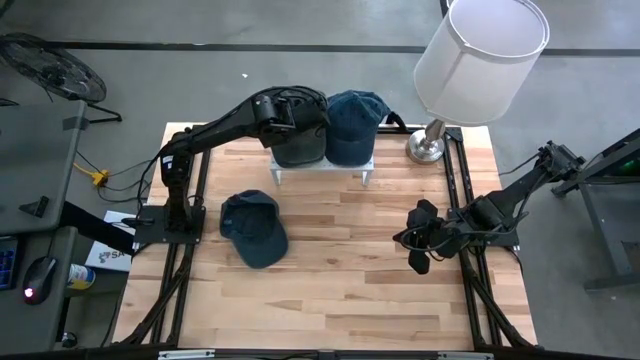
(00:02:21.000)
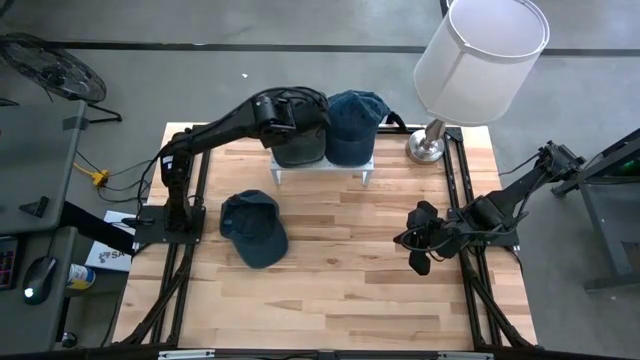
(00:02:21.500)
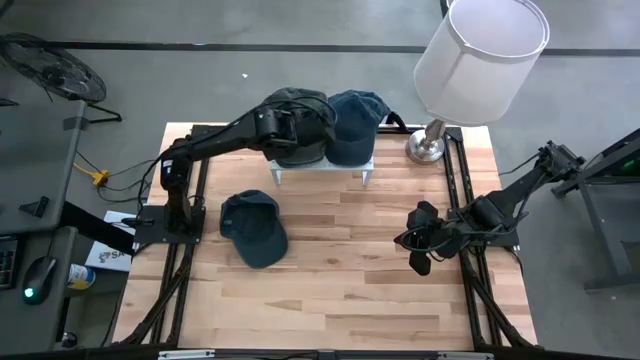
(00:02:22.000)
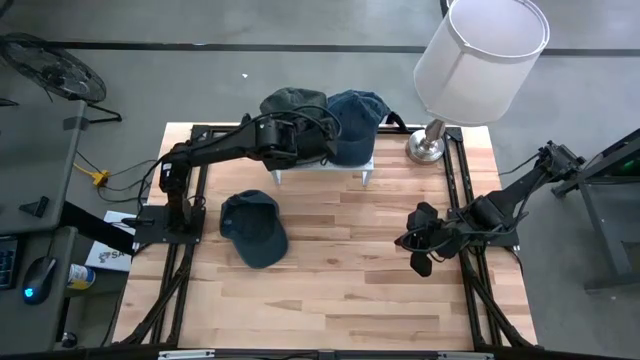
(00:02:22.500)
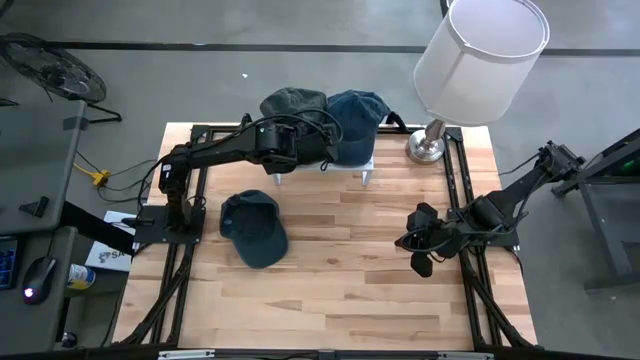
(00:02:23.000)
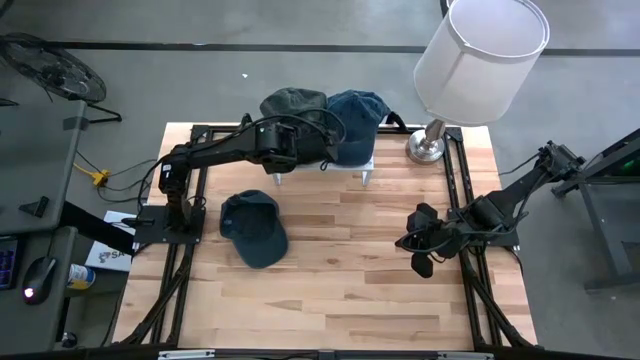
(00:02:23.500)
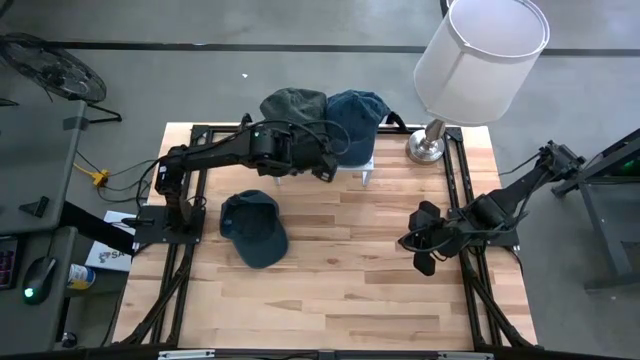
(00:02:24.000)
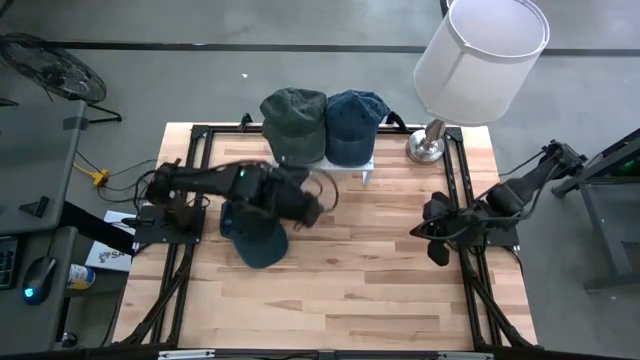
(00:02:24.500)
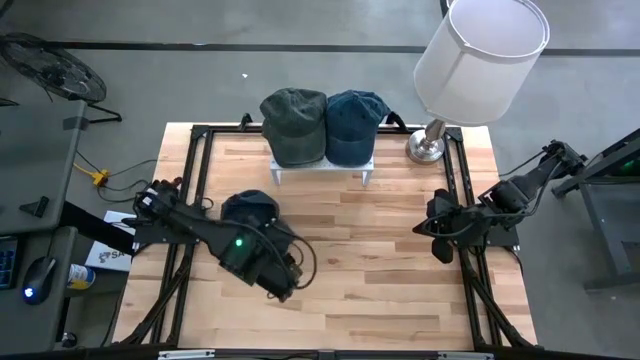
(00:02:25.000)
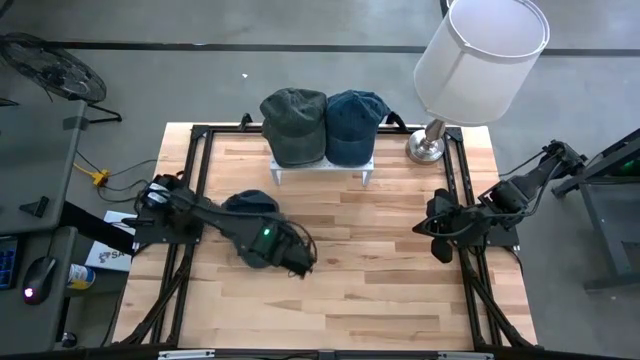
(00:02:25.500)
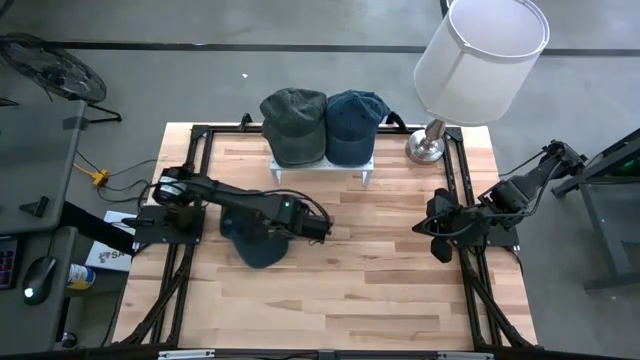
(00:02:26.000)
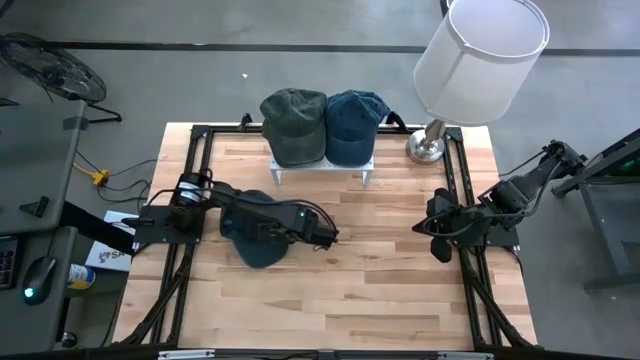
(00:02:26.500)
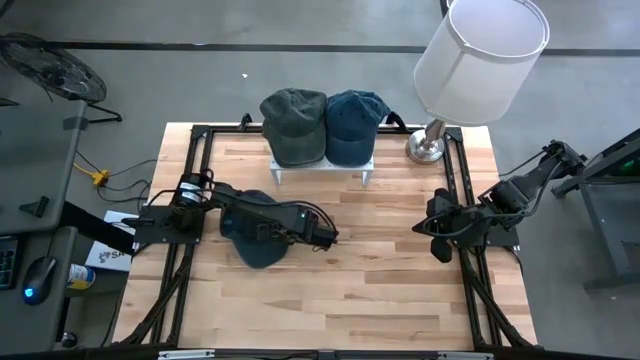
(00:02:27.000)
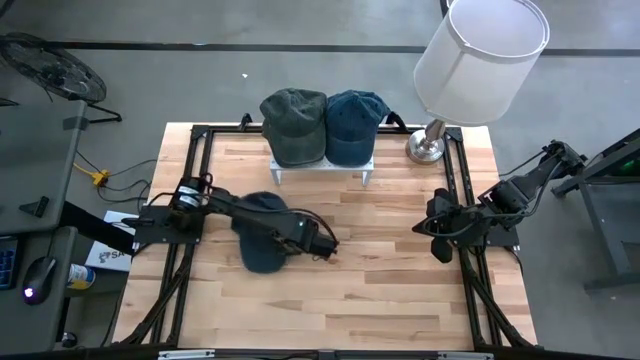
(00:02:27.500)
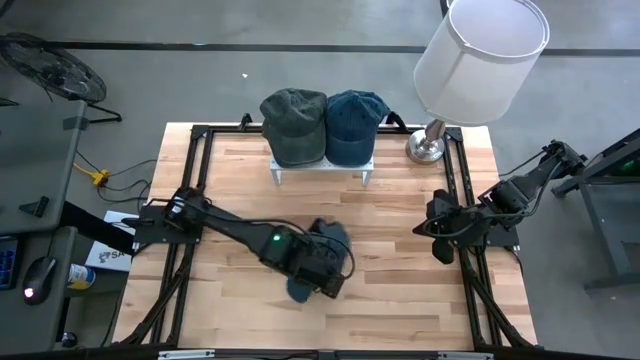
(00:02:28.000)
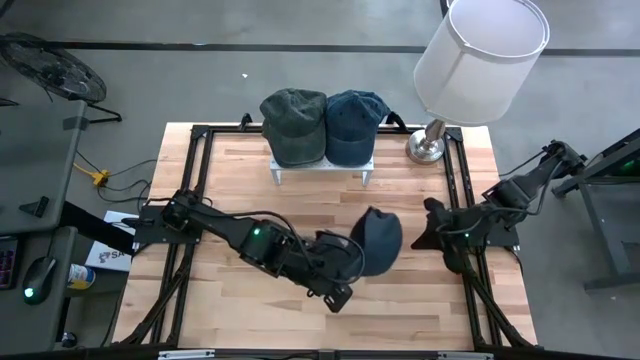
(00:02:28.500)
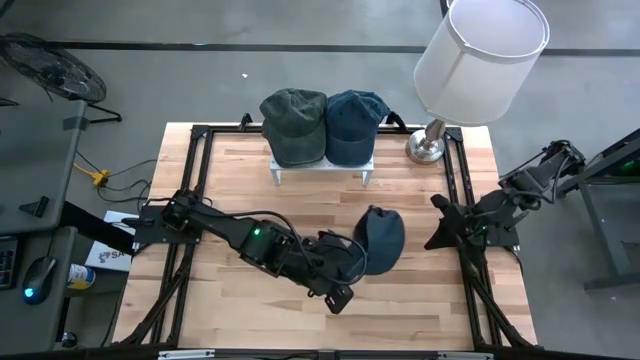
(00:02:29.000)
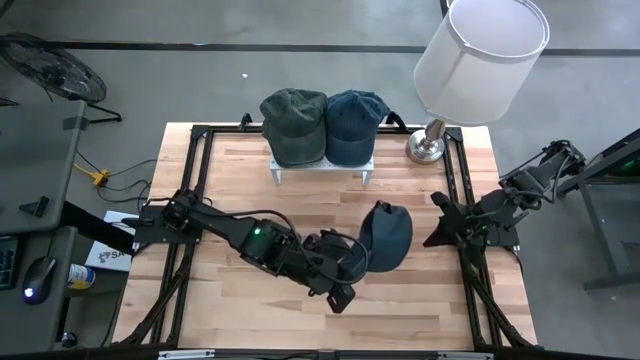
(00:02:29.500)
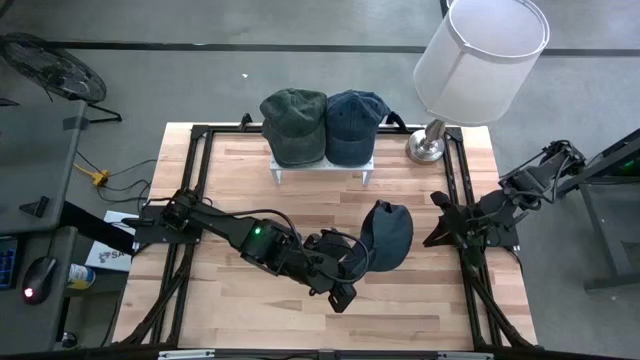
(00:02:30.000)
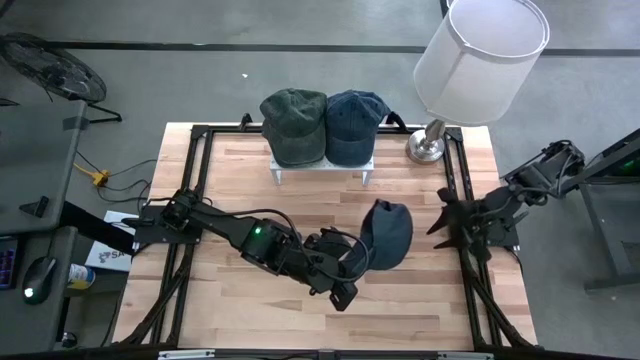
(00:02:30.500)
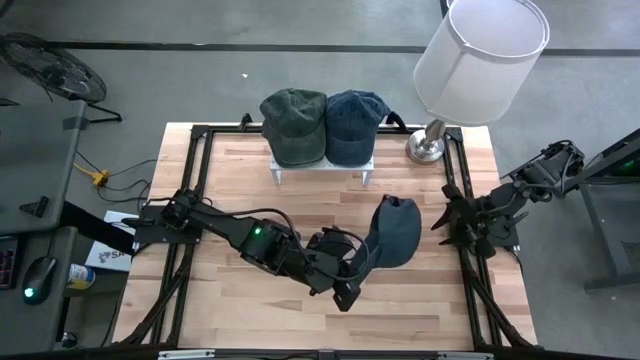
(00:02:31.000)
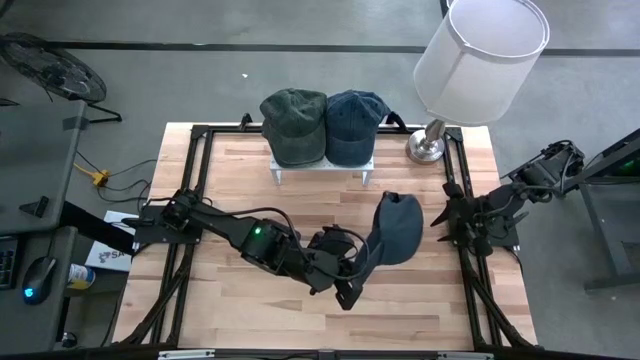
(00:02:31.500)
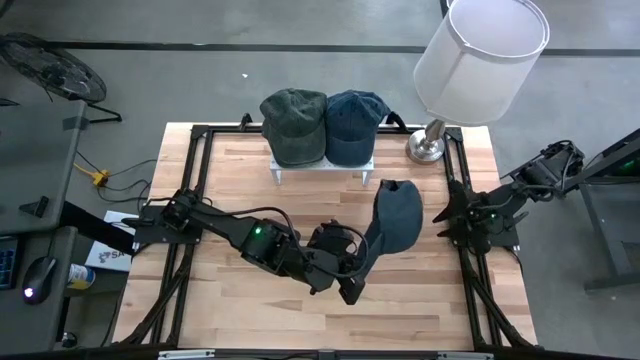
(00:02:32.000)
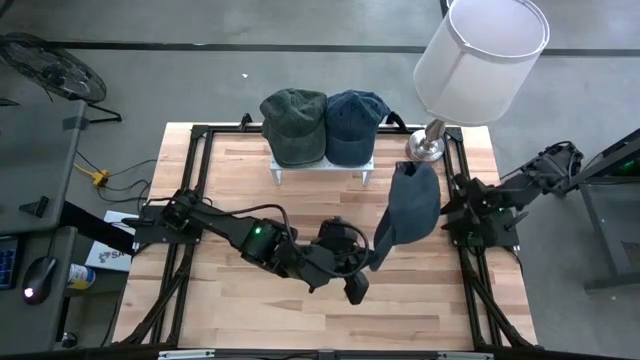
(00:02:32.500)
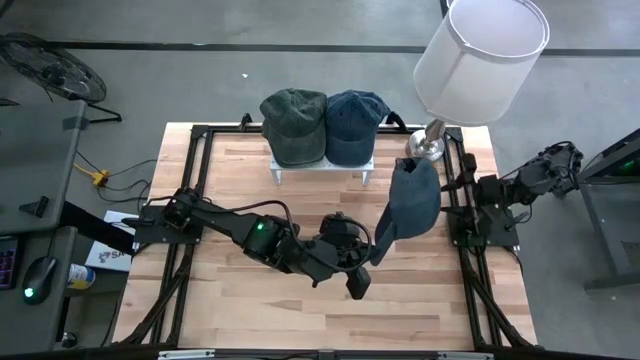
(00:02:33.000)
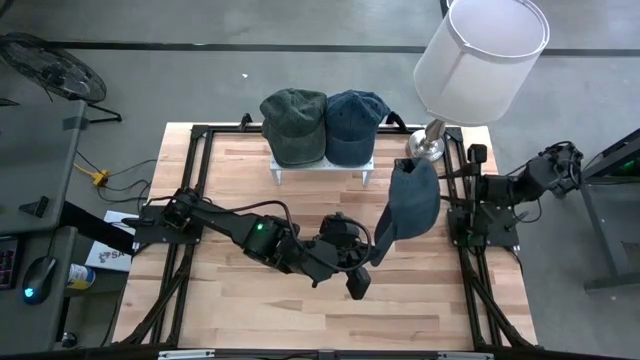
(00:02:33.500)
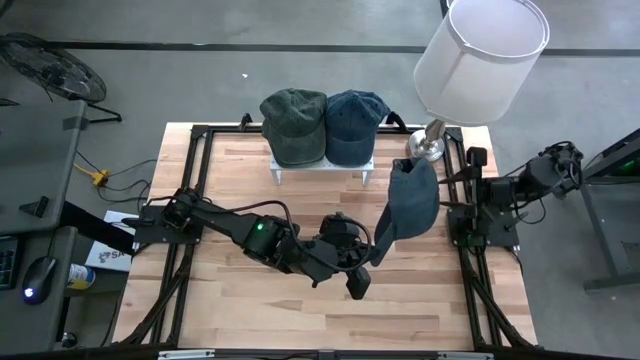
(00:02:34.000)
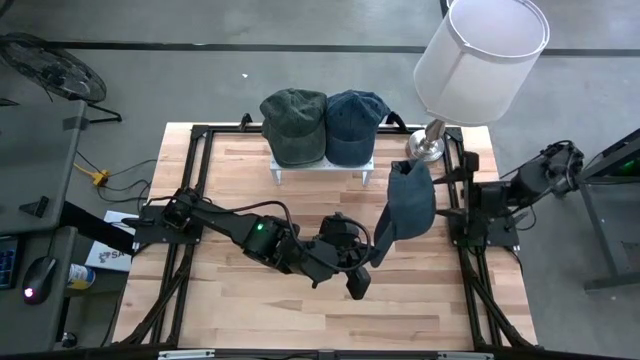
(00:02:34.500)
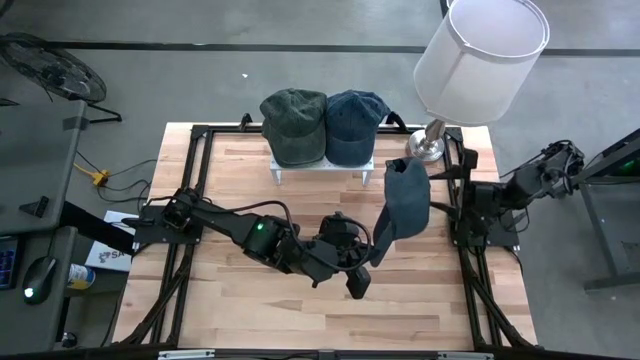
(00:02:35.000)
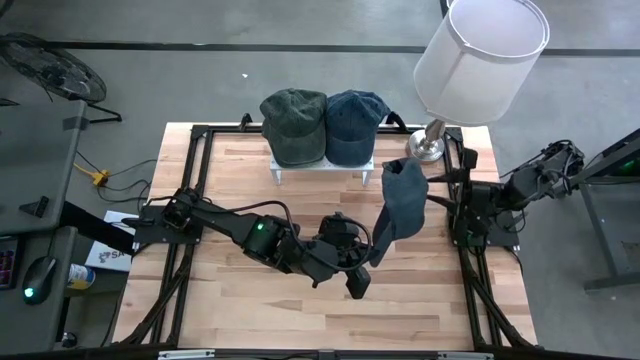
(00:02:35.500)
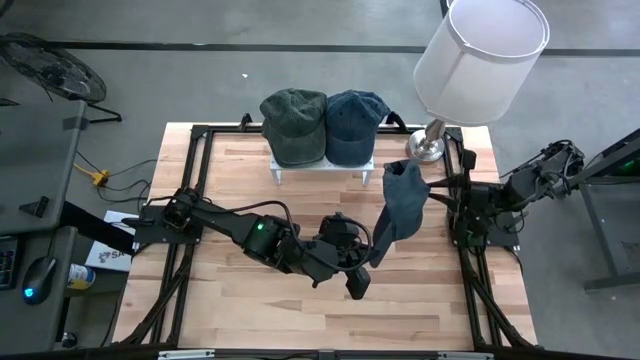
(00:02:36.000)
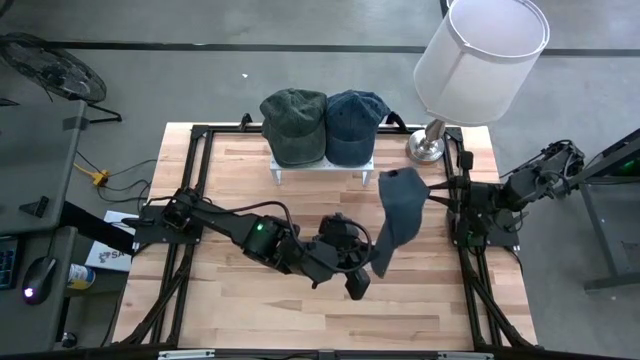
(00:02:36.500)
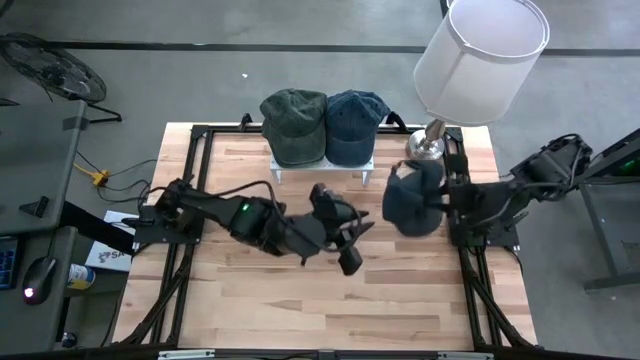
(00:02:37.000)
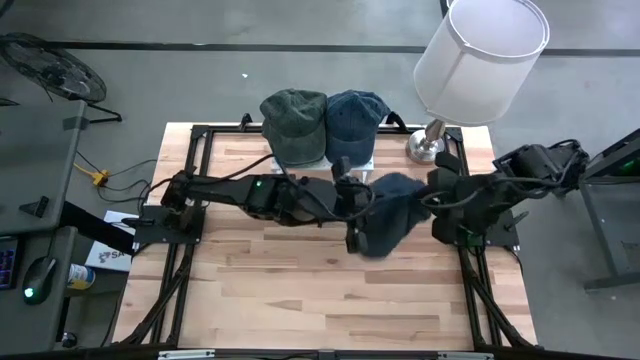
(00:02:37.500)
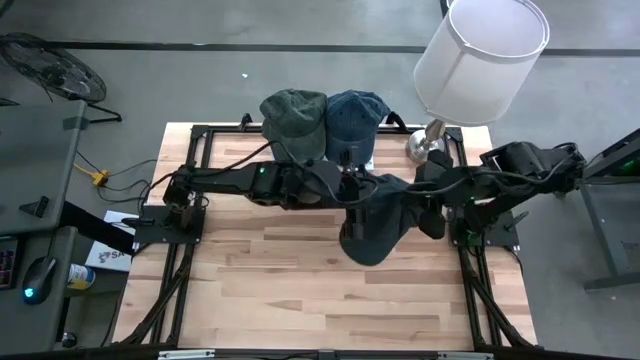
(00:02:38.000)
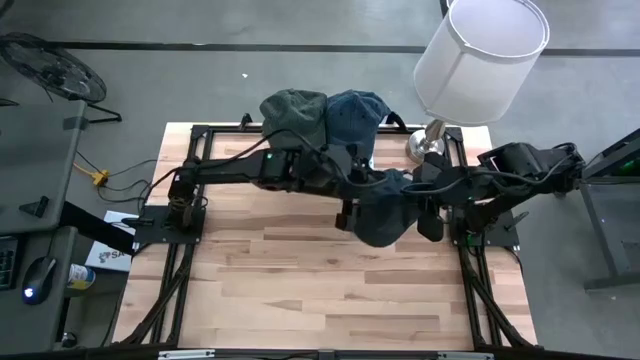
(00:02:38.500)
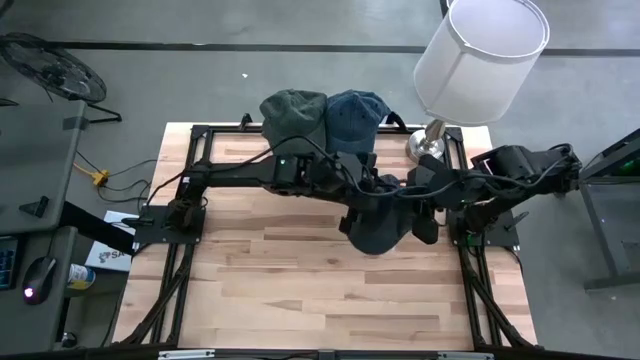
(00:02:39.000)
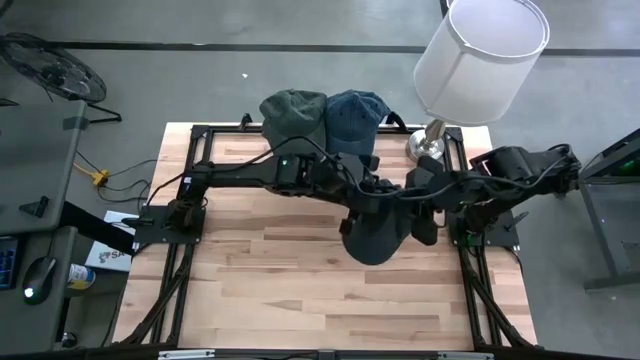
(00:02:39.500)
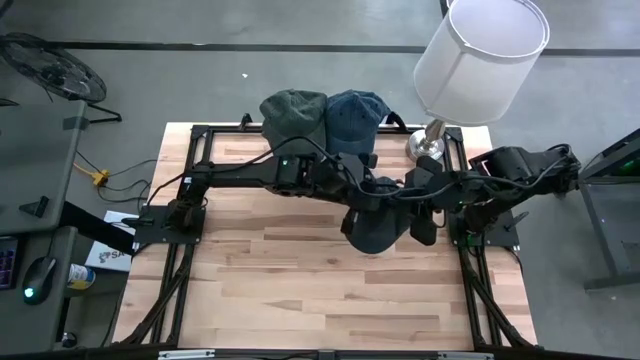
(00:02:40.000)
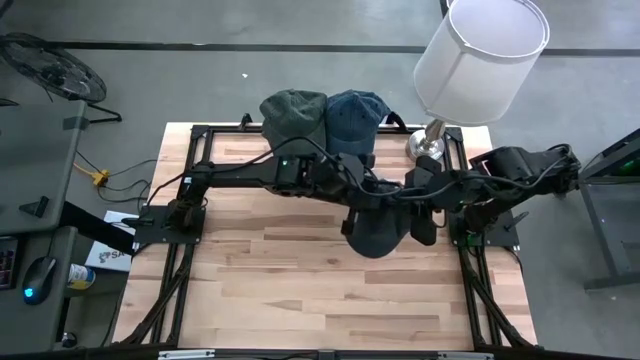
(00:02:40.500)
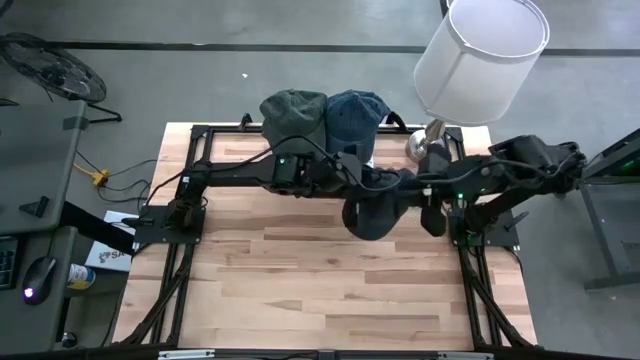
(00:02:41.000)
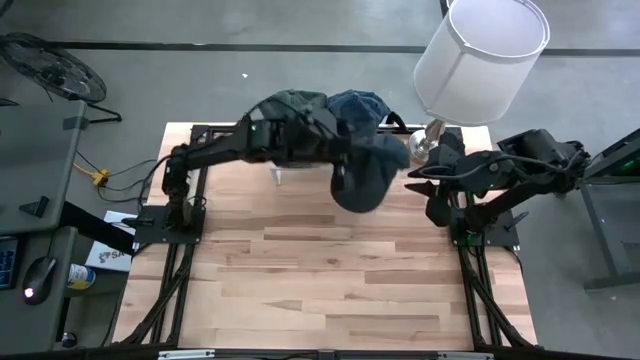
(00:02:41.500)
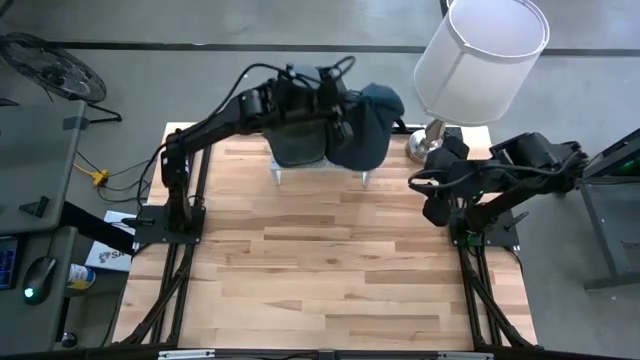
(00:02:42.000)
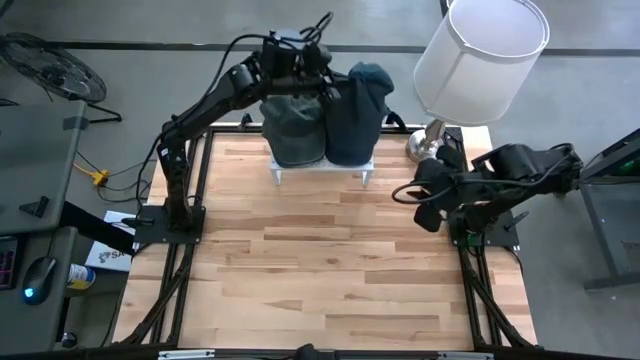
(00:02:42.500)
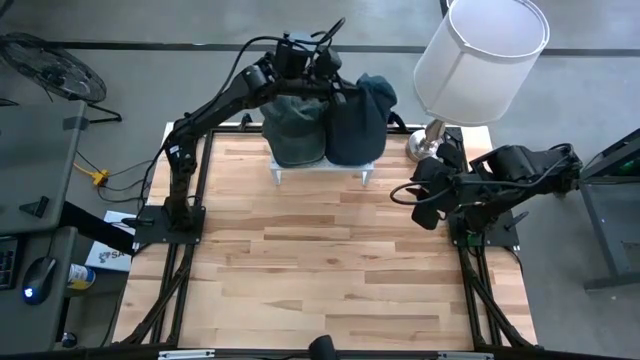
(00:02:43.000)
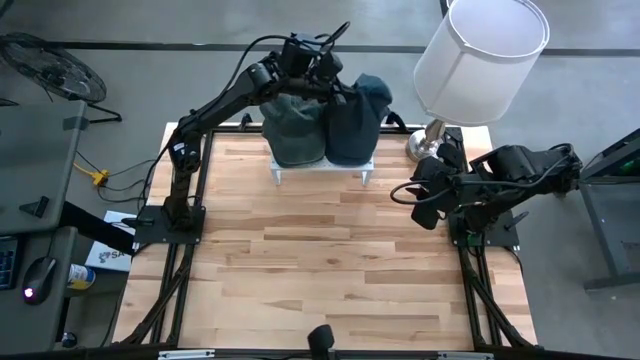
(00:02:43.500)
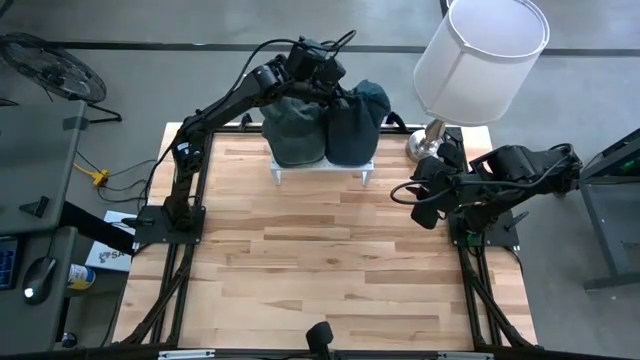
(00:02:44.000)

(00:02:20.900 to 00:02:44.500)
Task: Pick & Place hat
Stack the blue cap on top of the blue cap on the shelf
